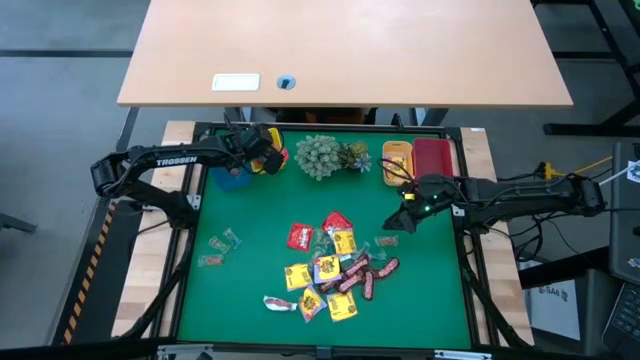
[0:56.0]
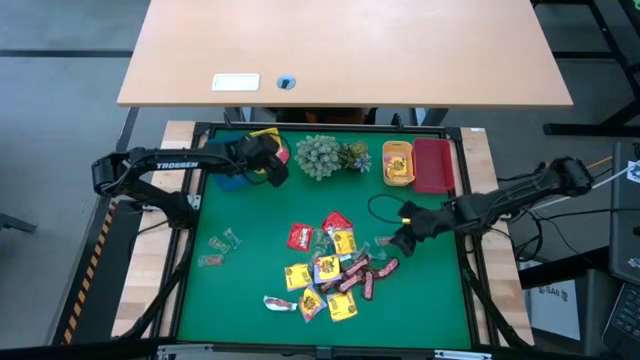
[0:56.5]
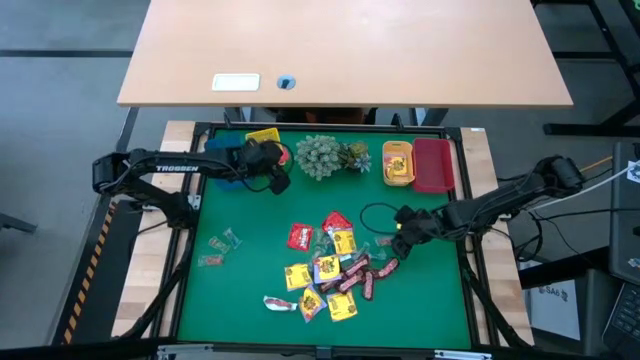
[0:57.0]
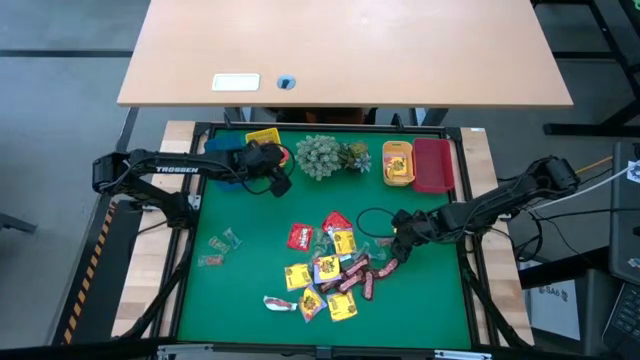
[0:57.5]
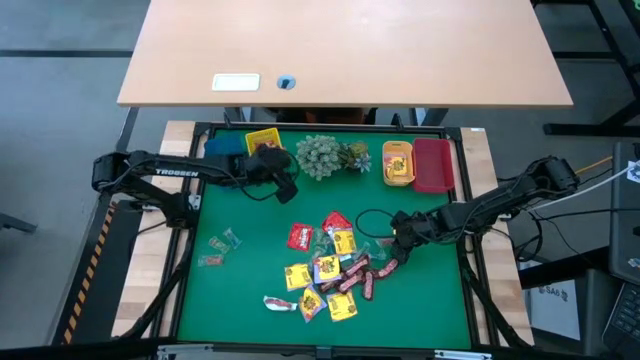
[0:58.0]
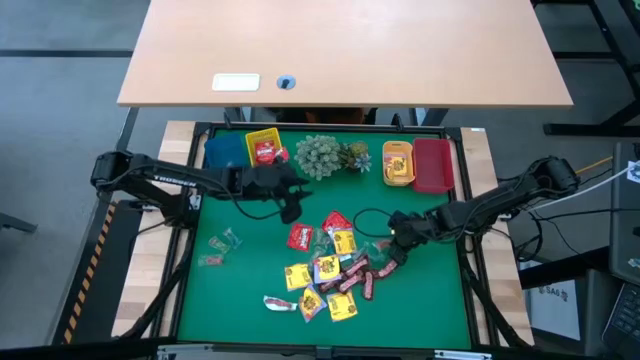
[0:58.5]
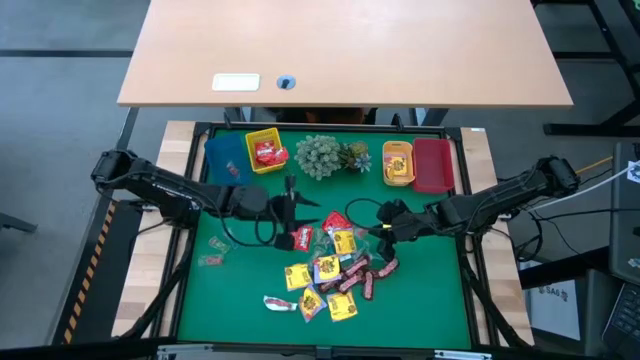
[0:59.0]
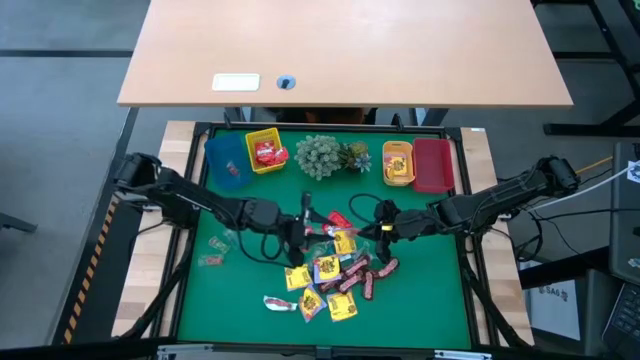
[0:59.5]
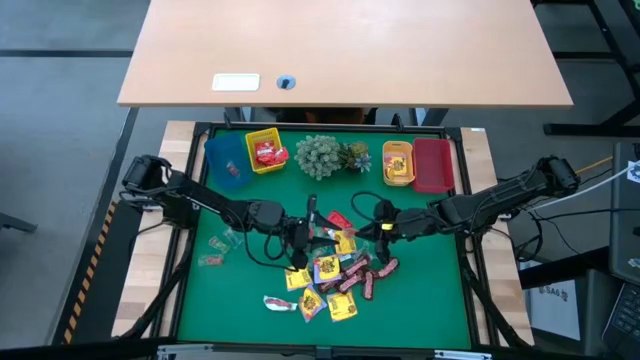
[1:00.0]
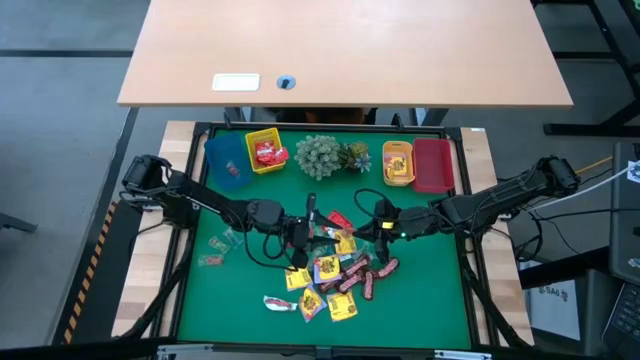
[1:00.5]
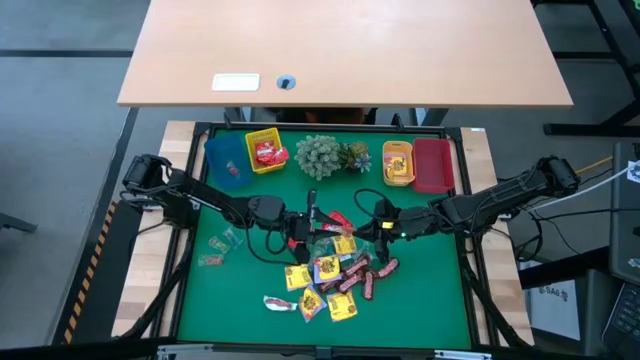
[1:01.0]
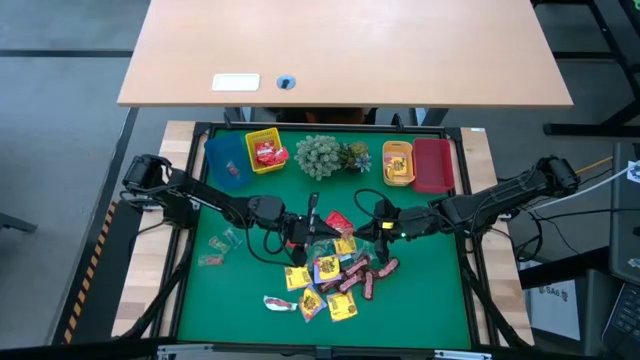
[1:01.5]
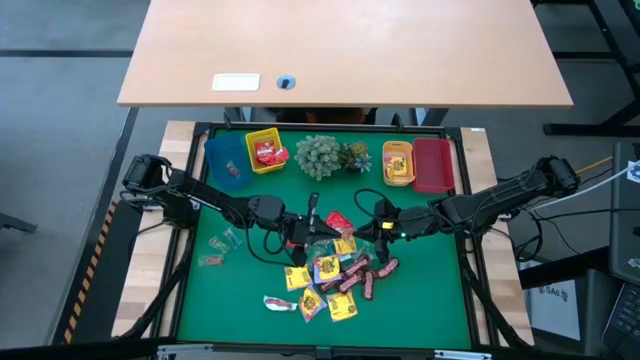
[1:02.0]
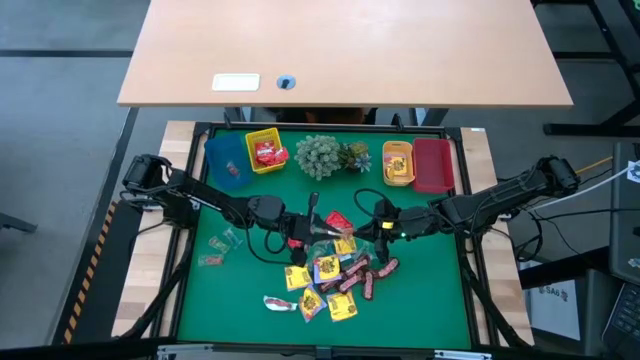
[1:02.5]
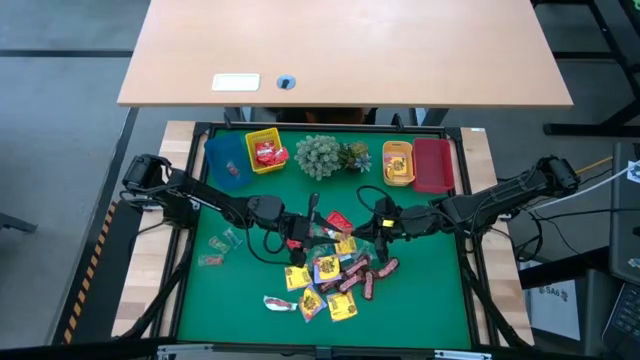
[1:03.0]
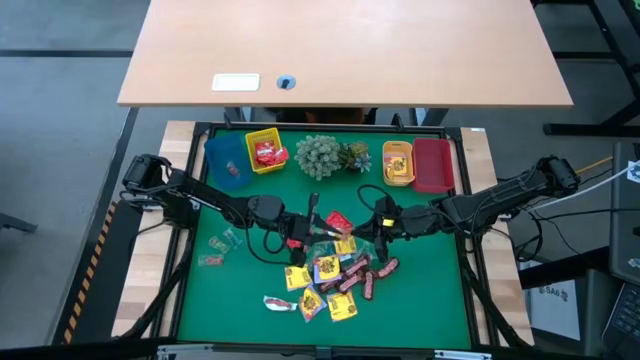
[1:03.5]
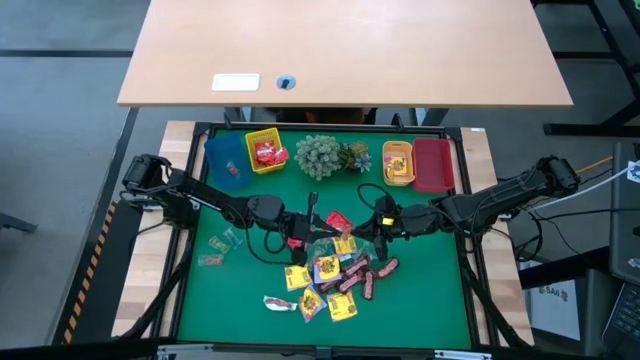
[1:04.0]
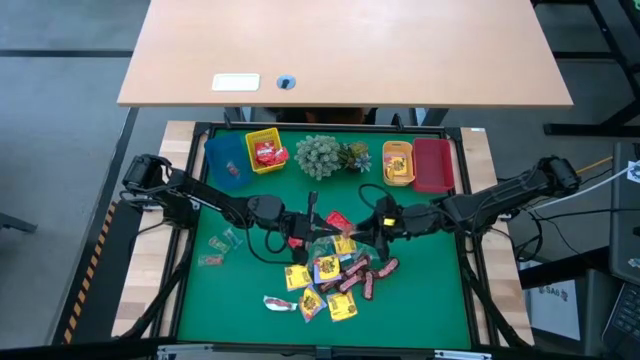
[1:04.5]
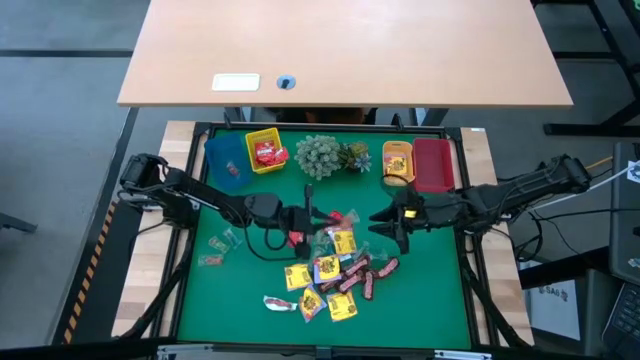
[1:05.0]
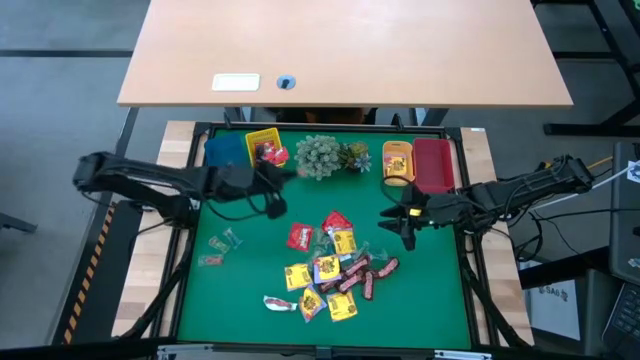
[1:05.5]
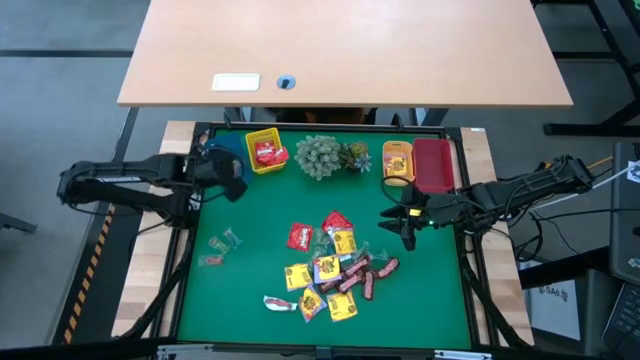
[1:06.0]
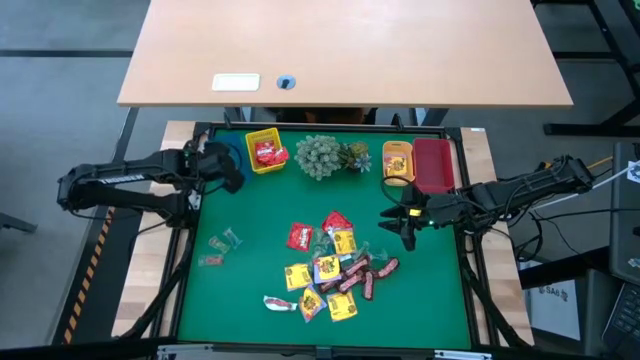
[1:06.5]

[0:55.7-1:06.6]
Task: Sort candy
Put the orange gummy into the blue bin

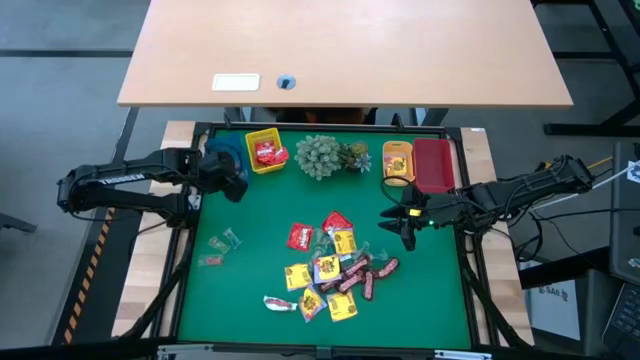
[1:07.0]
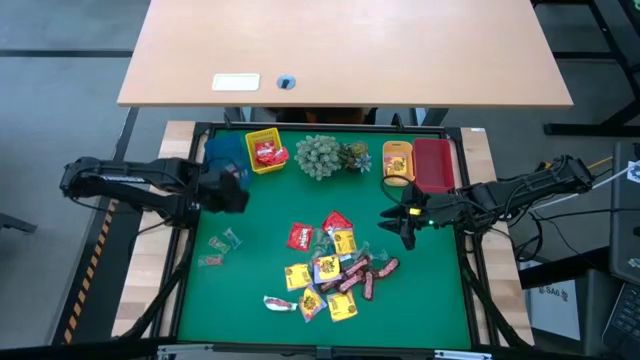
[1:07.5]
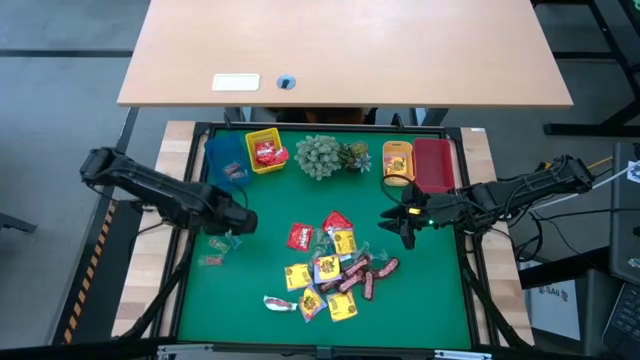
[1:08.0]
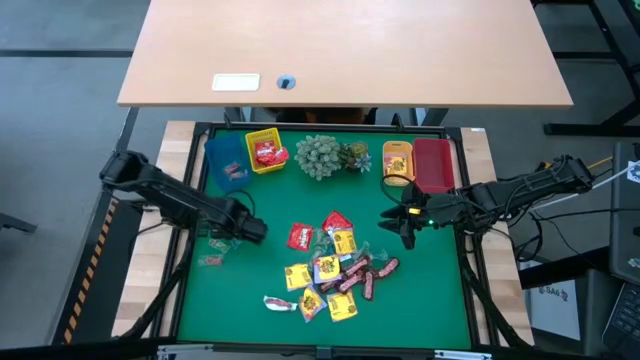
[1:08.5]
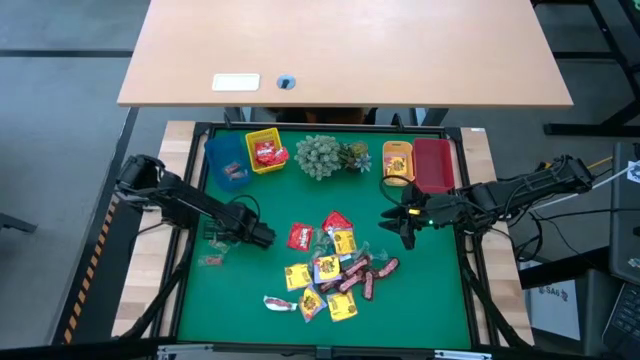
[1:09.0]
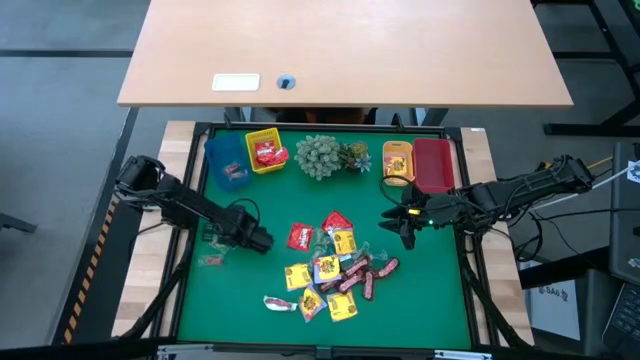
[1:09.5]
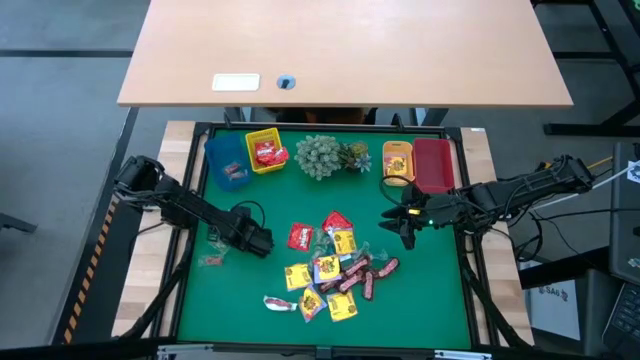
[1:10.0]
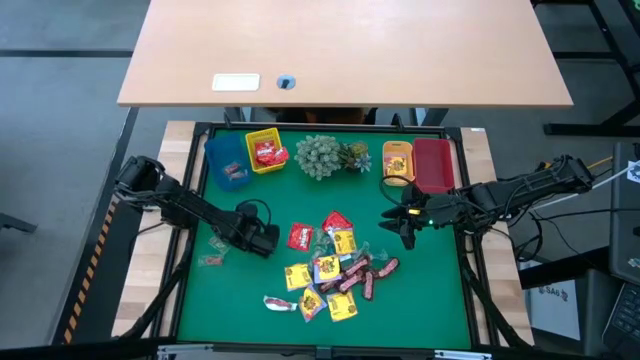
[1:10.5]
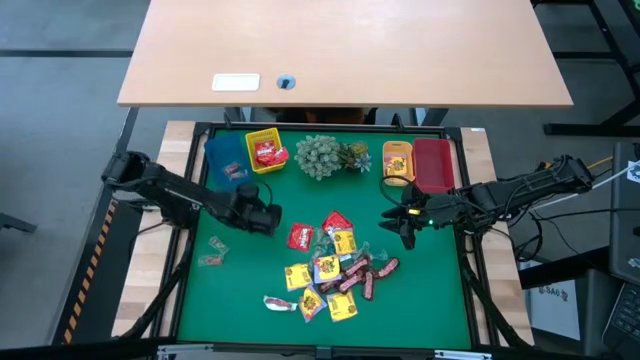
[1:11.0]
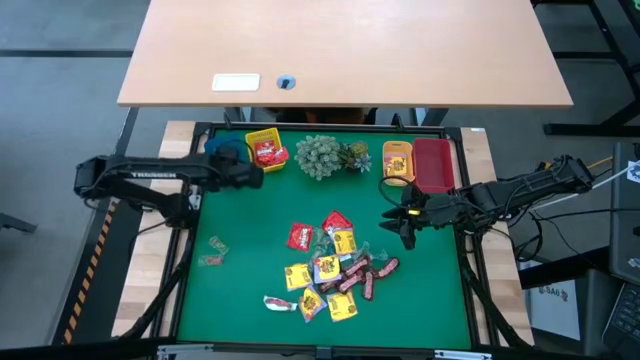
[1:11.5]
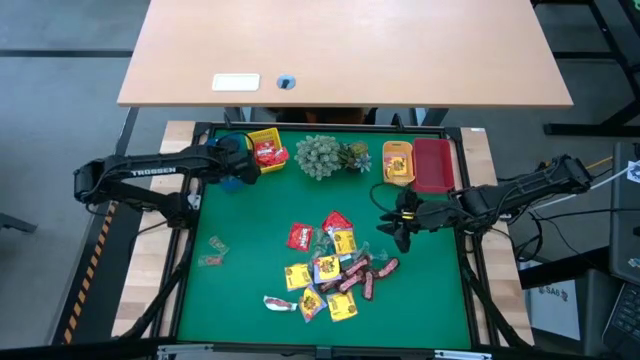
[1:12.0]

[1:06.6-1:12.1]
Put the blue gummy into the blue bin

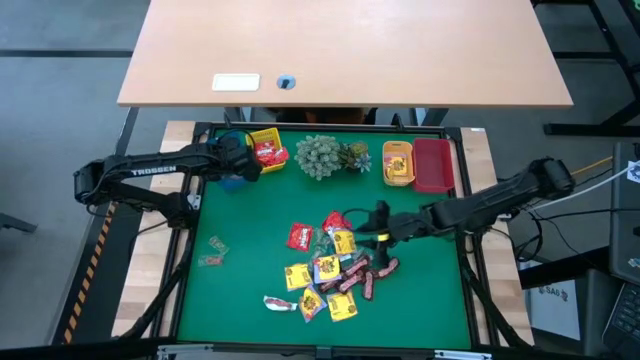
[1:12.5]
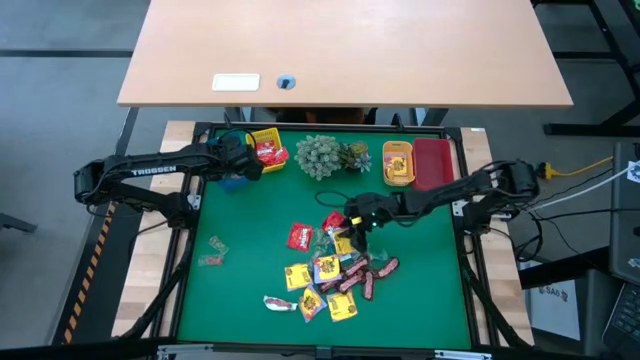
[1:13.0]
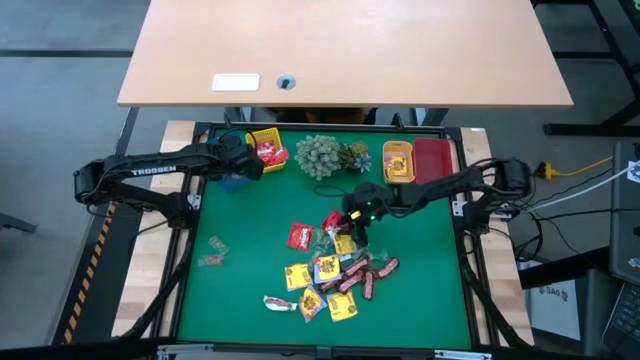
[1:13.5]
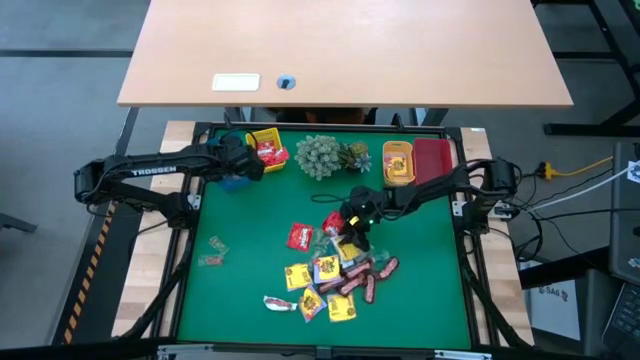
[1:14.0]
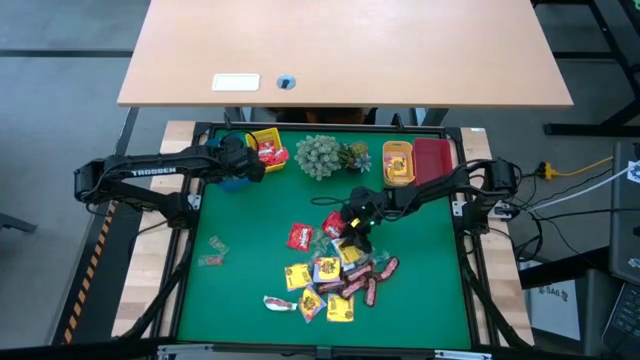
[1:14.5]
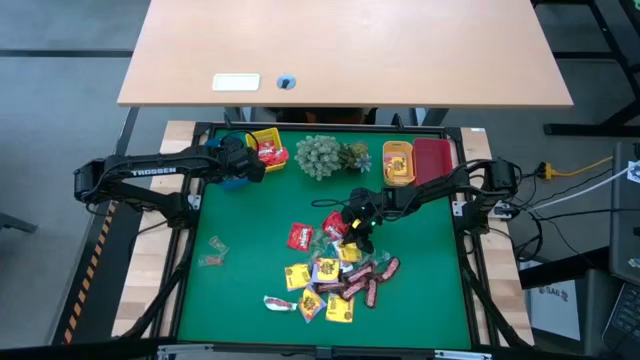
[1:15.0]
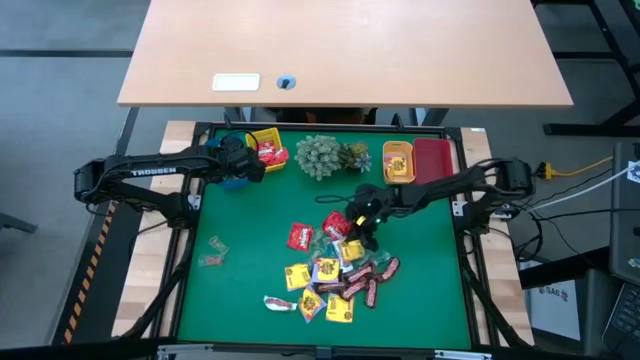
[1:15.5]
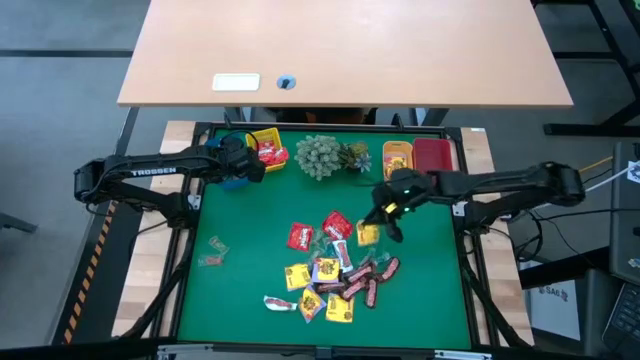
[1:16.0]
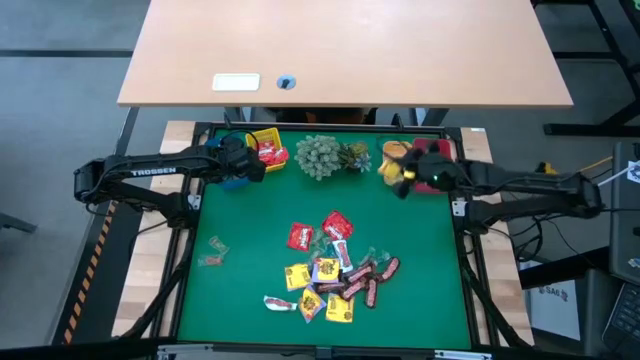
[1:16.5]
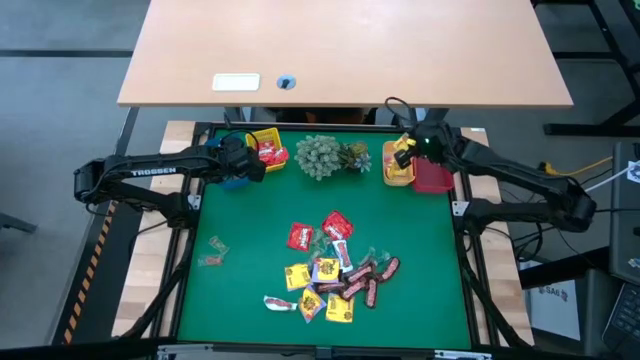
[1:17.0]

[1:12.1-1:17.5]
Put the yellow candy into the orange bin
